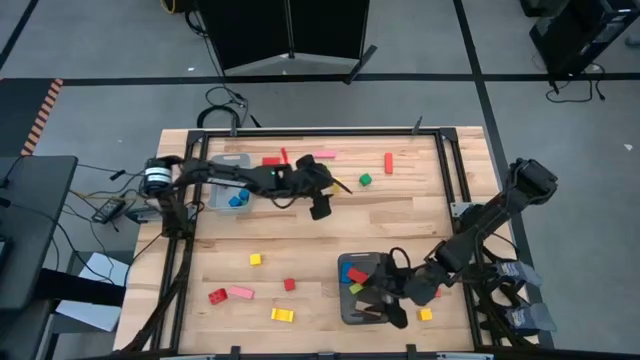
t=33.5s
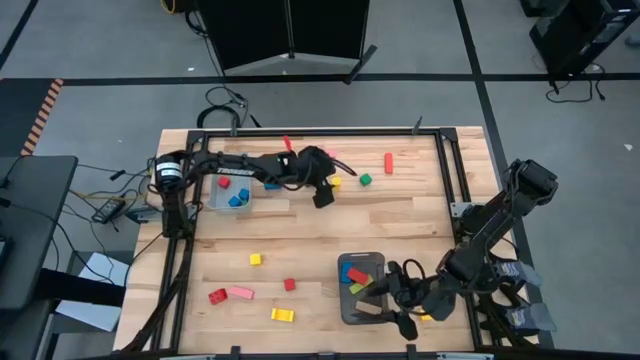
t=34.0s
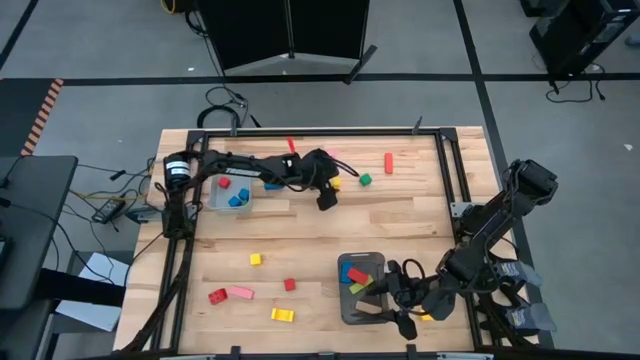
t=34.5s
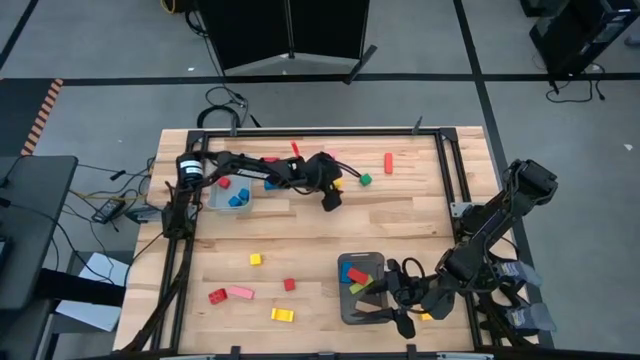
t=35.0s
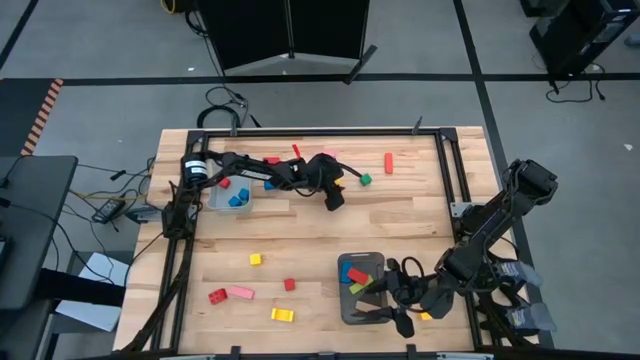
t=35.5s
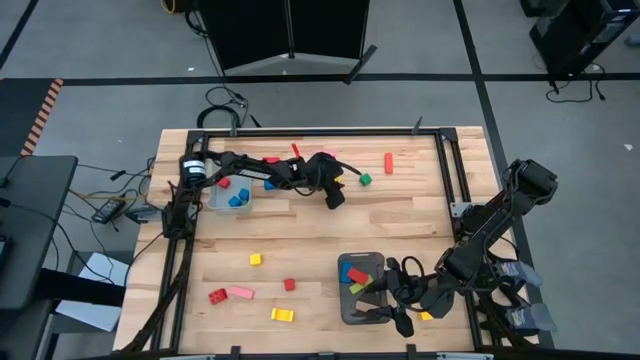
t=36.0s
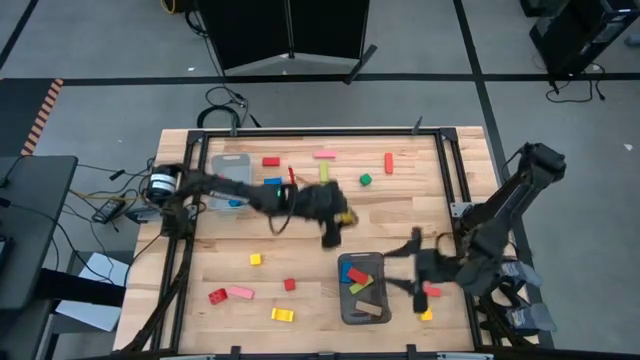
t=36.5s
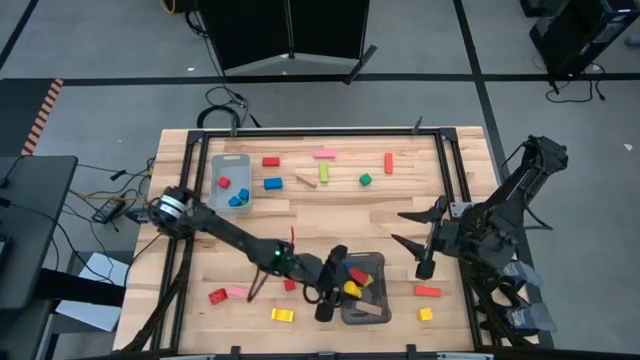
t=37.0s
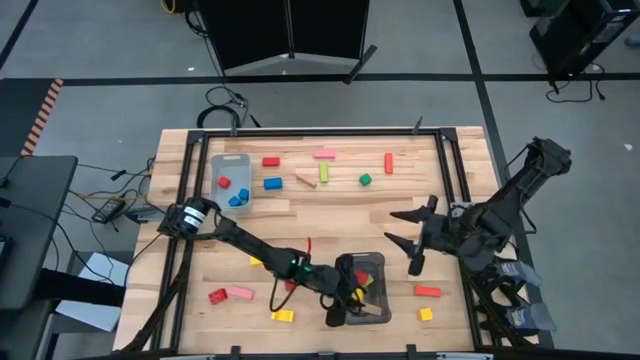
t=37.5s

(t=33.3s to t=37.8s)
Task: Sort blocks by size
Put the yellow cylindrical block into the black bin

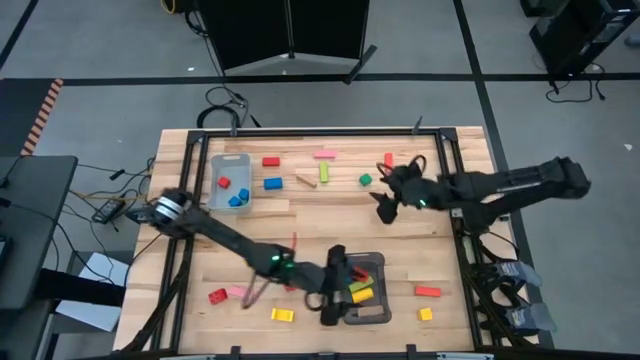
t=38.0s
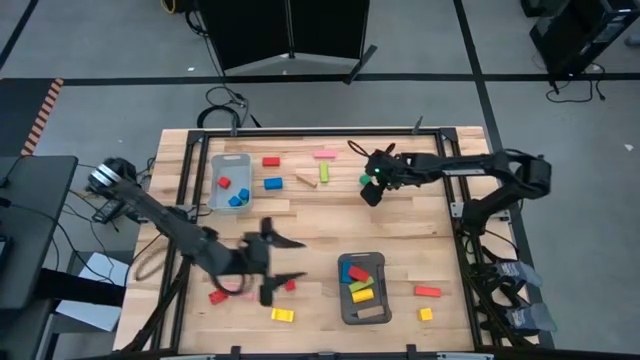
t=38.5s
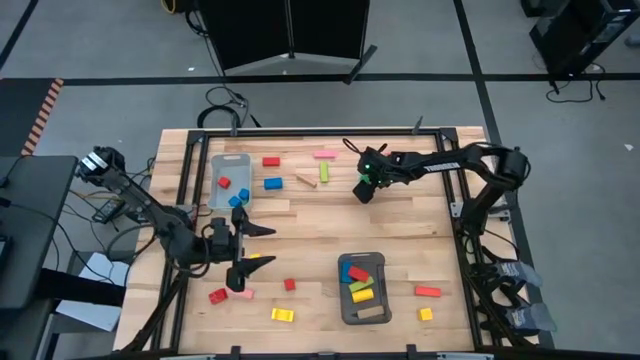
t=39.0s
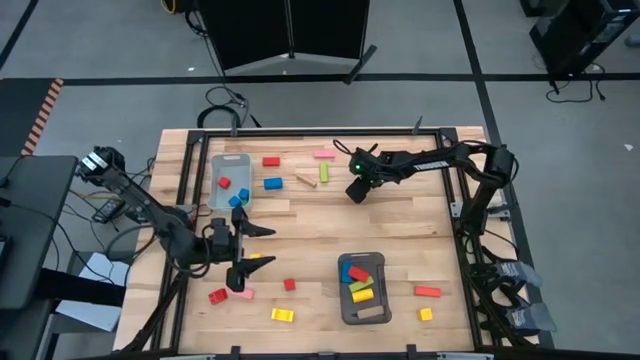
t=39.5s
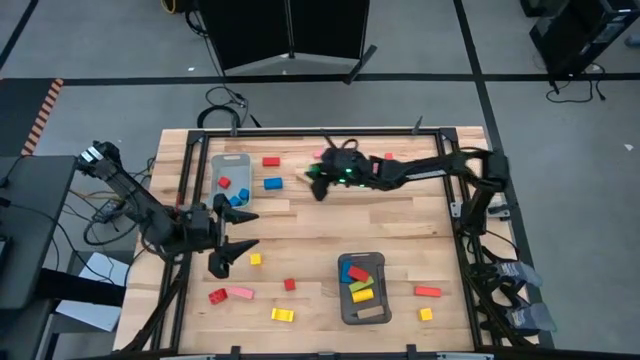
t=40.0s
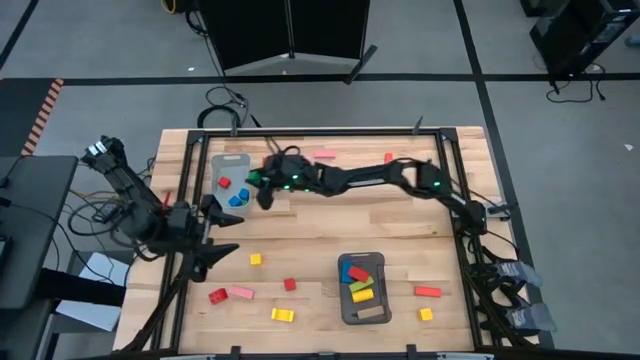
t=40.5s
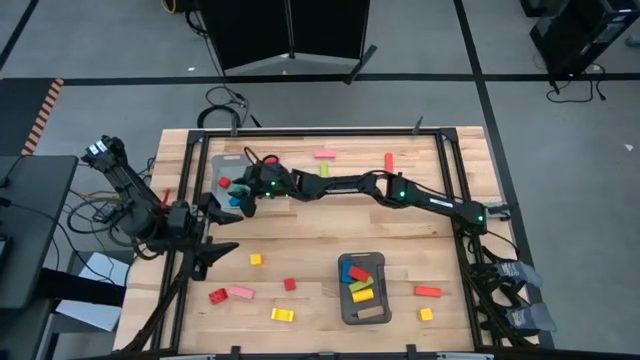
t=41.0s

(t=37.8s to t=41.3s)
Put the green cube block into the gray bin

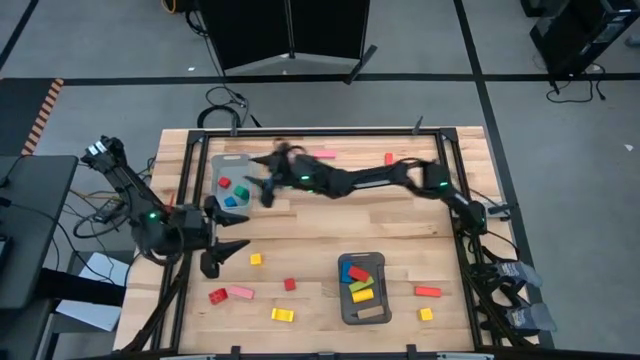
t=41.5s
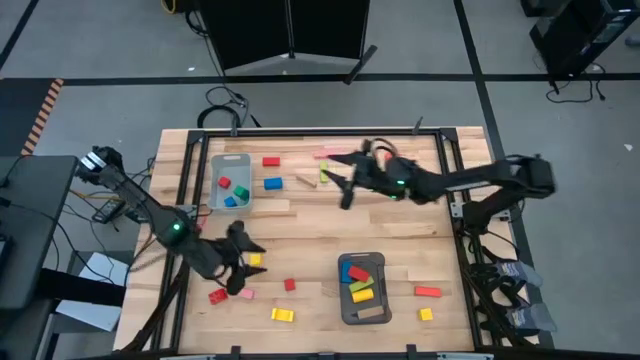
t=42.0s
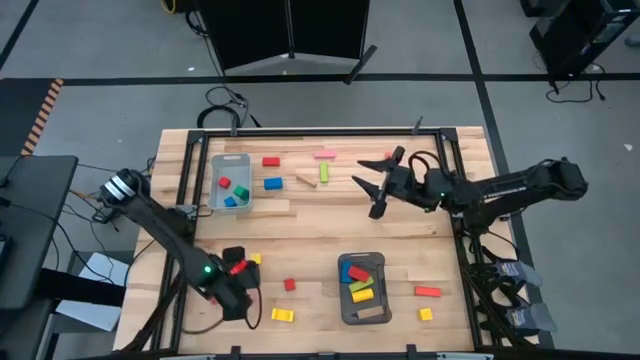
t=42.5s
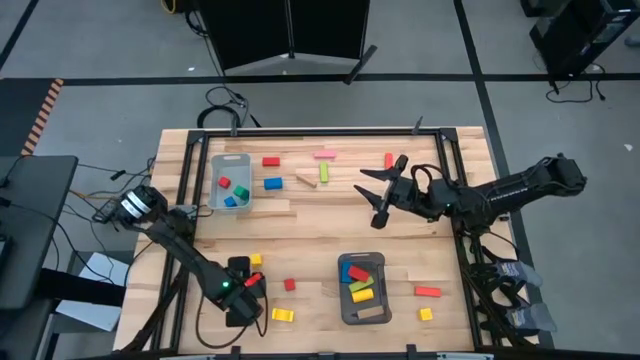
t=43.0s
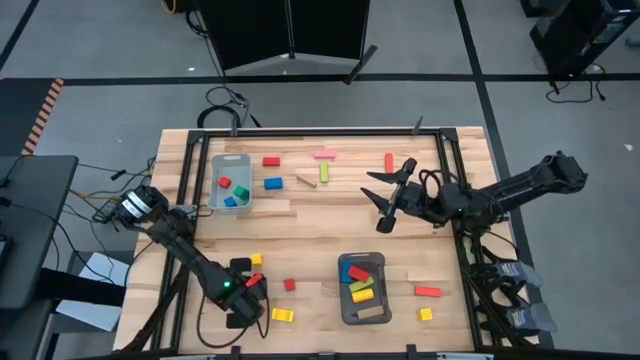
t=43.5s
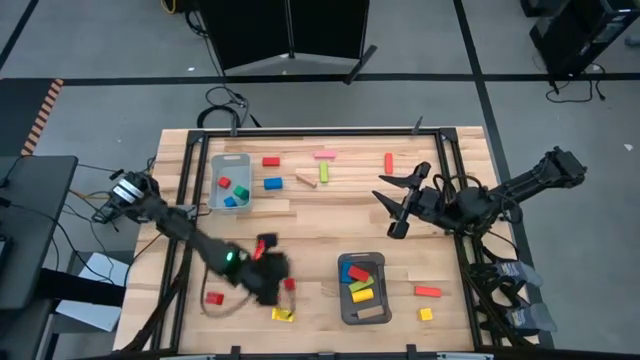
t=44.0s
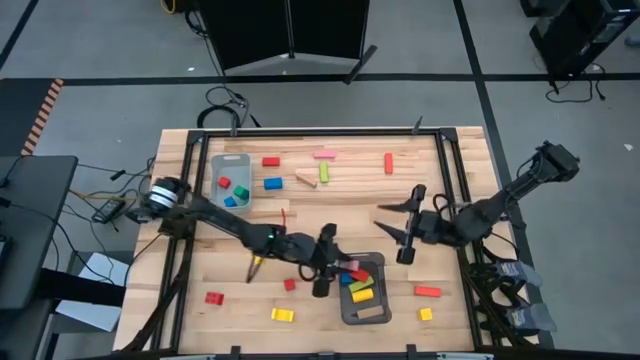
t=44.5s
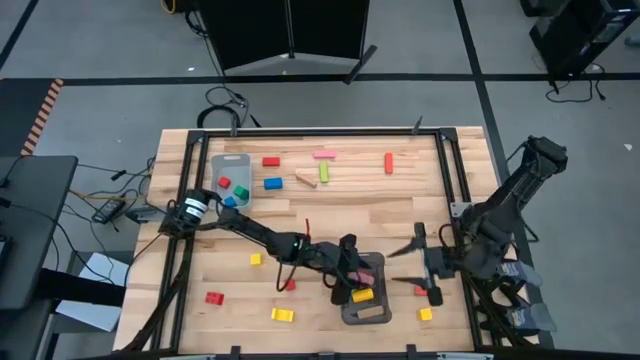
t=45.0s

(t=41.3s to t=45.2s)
Put the pink rectangular block into the black bin

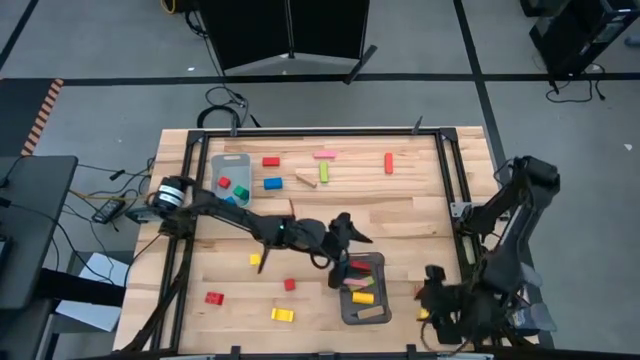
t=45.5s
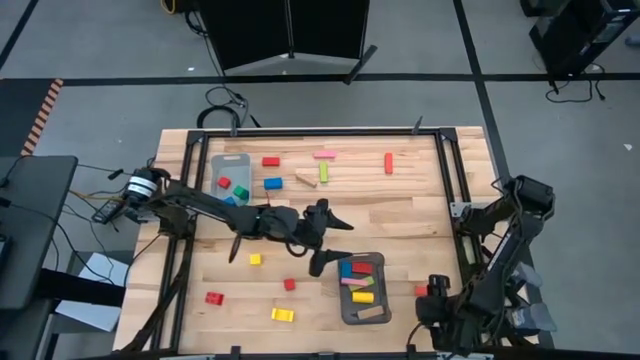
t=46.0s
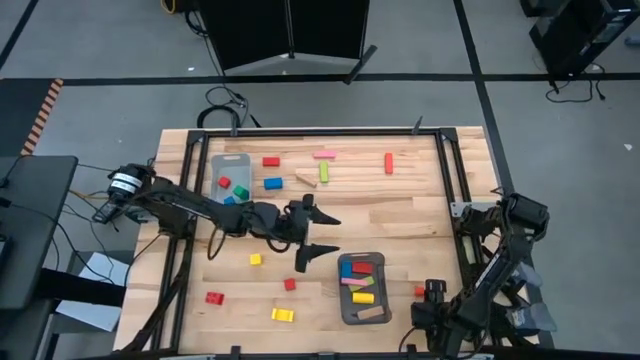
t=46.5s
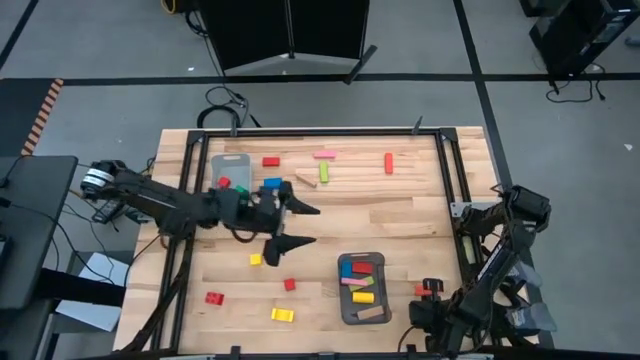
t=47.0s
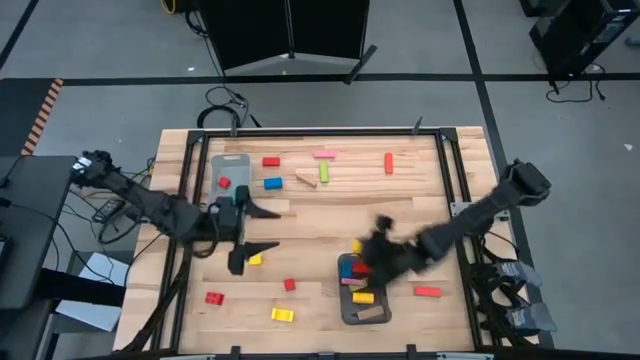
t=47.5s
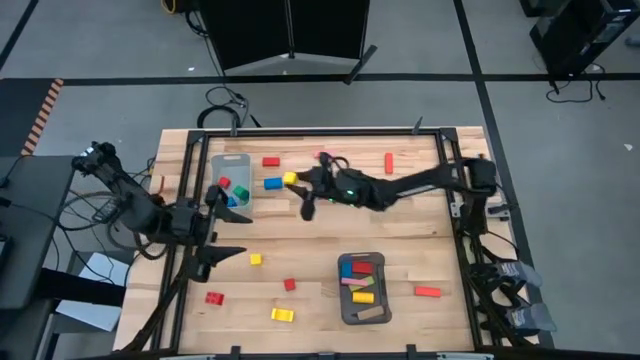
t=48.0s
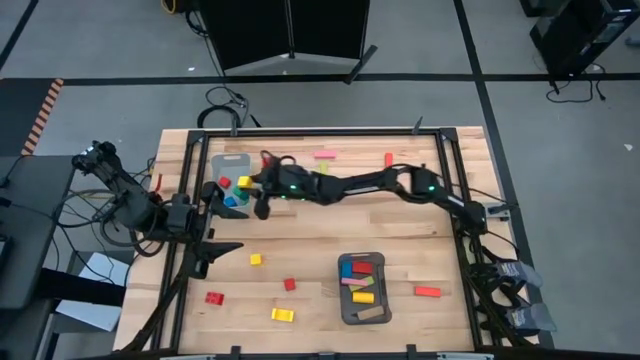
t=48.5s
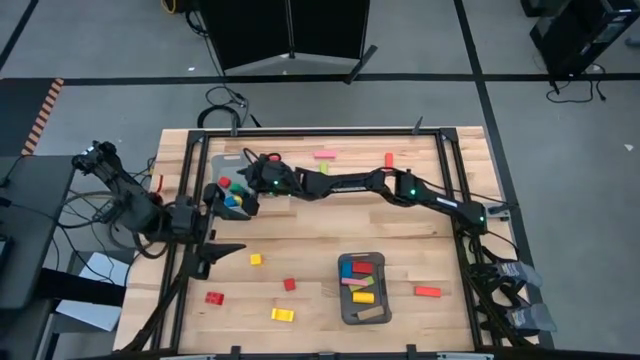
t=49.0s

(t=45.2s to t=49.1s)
Put the yellow cube block into the gray bin

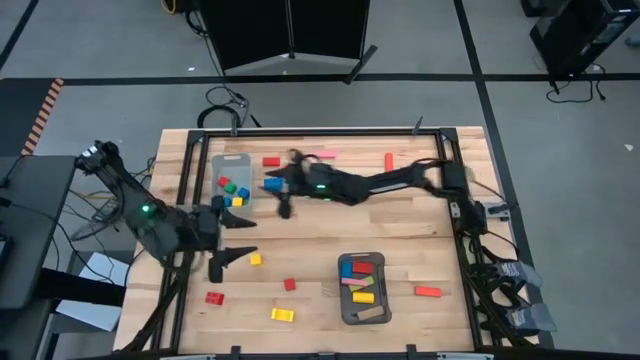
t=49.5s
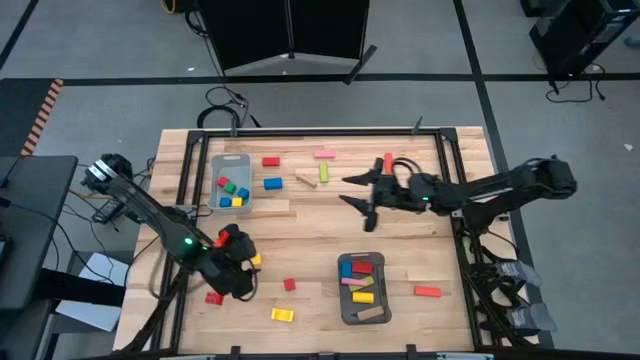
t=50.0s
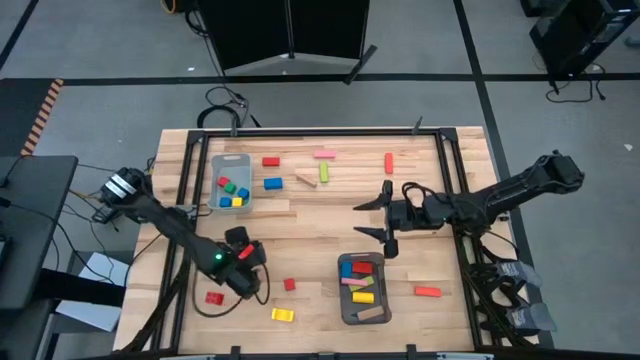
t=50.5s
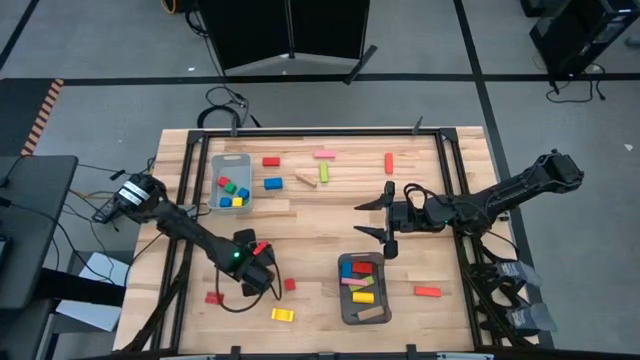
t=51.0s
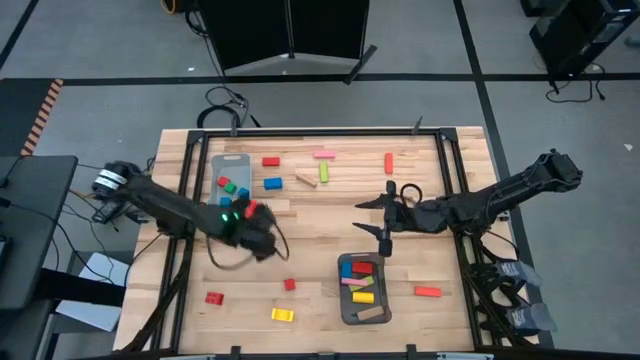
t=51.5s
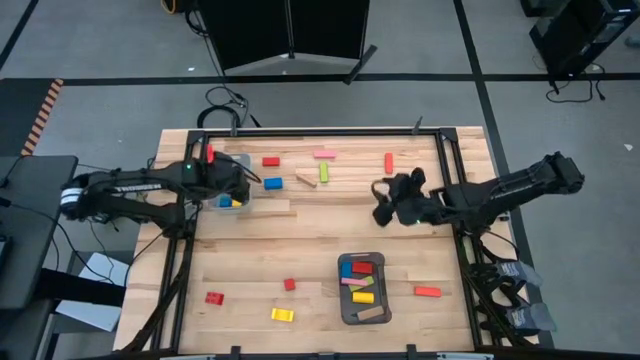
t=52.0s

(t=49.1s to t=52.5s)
Put the yellow cube block into the gray bin

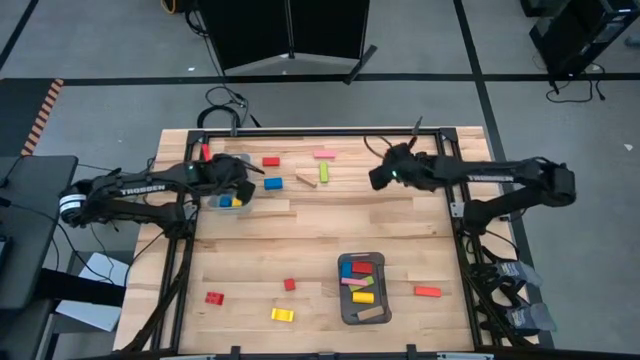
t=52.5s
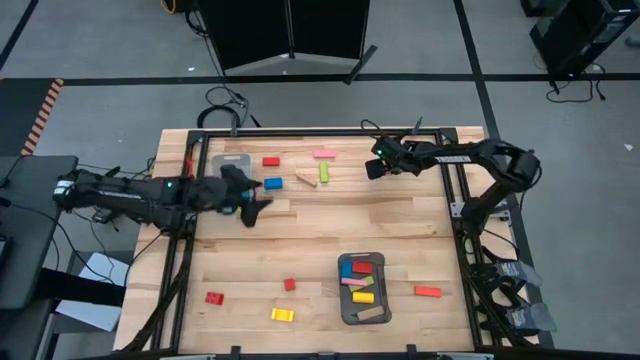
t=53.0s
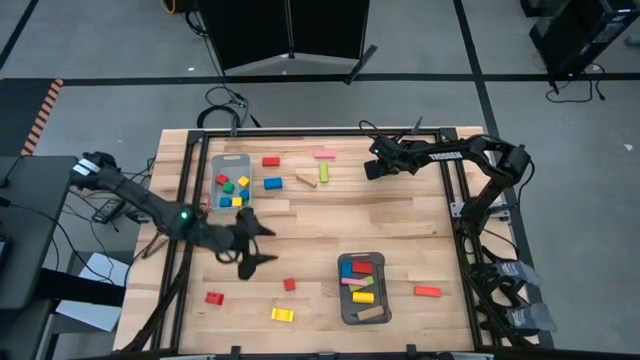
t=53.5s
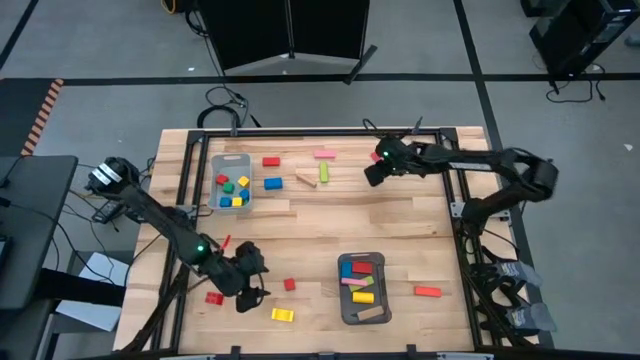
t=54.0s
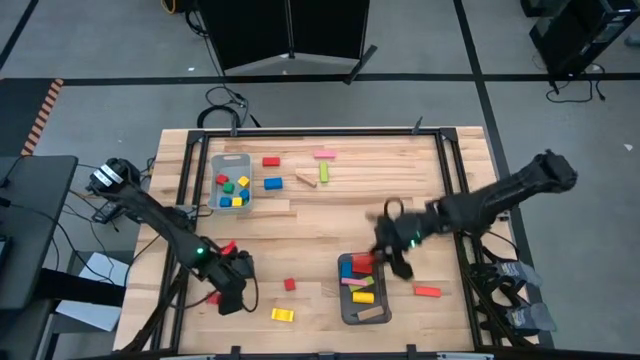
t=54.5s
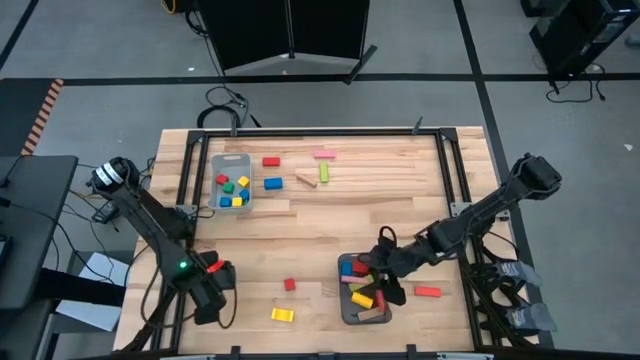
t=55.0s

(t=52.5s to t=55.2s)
Put the orange rectangular block into the black bin

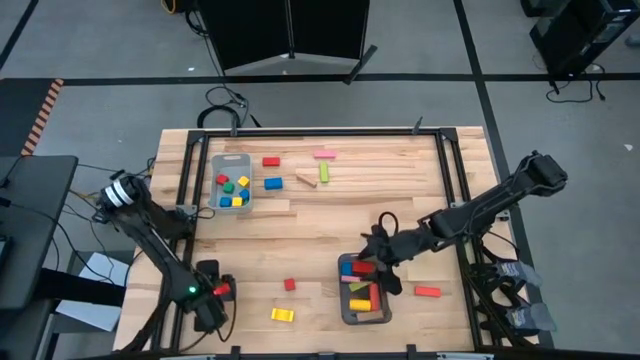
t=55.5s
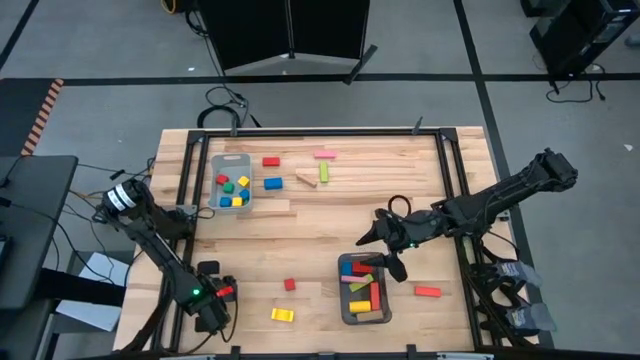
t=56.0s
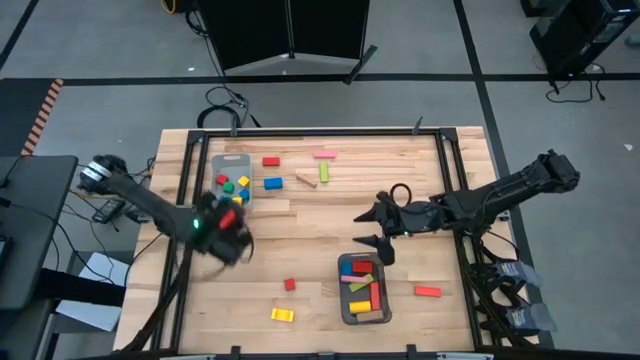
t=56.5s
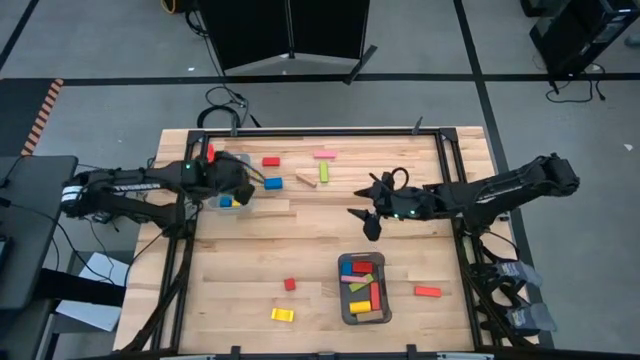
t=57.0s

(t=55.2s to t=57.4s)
Put the red 4 stud game piece into the gray bin
